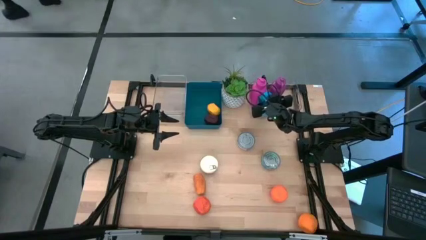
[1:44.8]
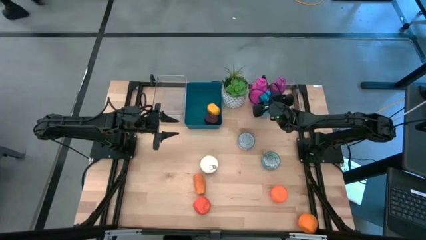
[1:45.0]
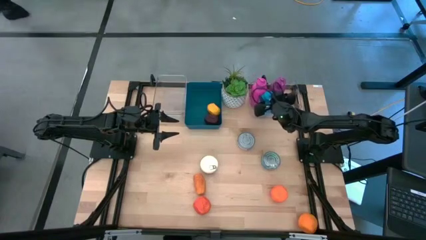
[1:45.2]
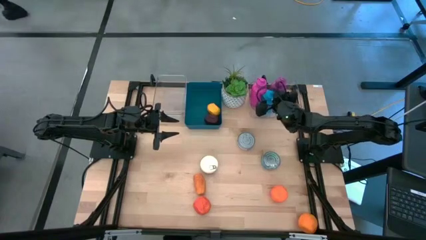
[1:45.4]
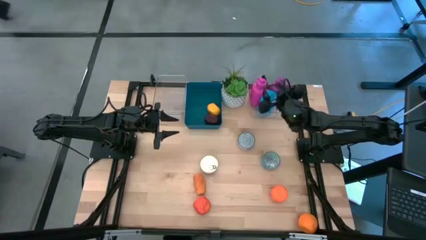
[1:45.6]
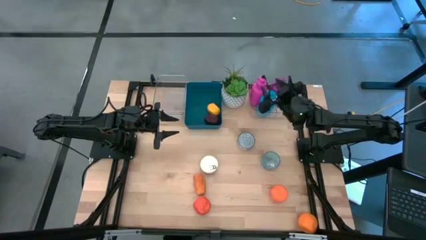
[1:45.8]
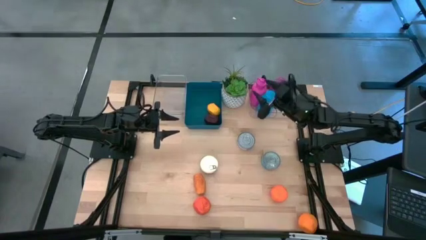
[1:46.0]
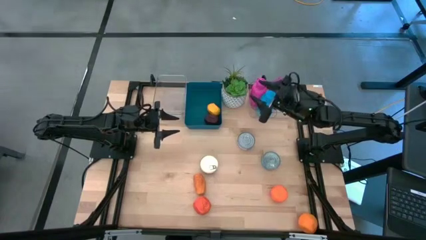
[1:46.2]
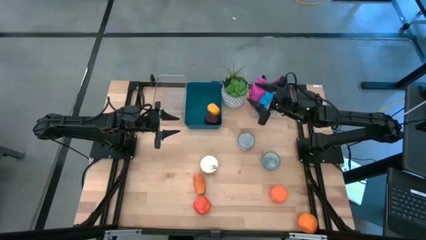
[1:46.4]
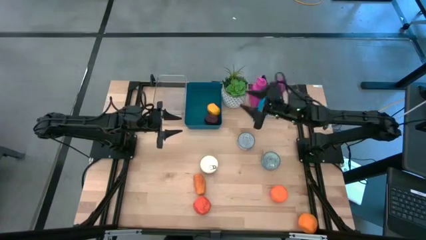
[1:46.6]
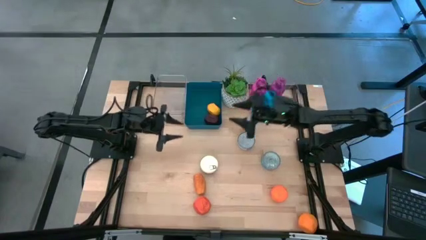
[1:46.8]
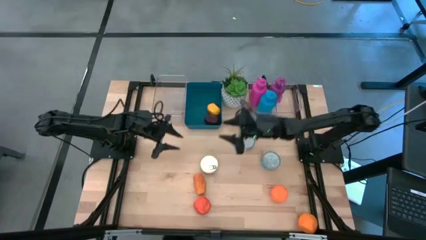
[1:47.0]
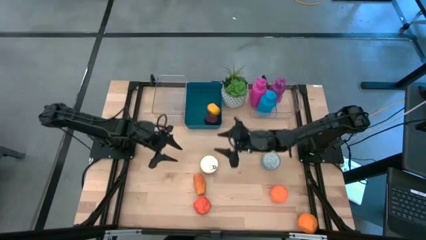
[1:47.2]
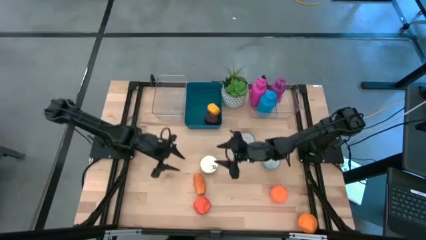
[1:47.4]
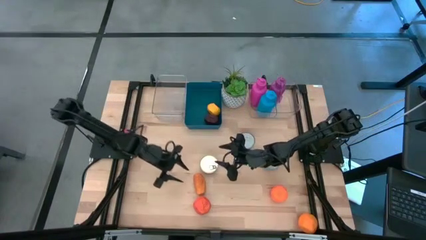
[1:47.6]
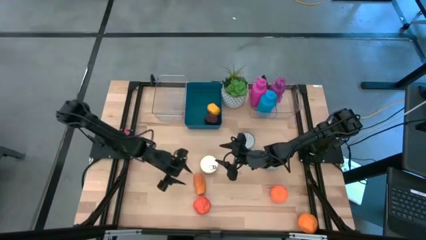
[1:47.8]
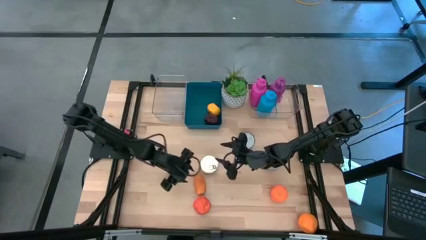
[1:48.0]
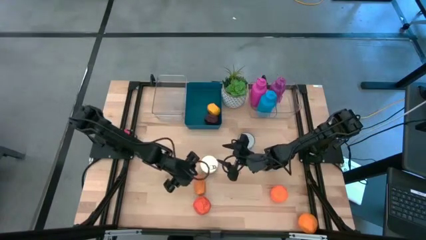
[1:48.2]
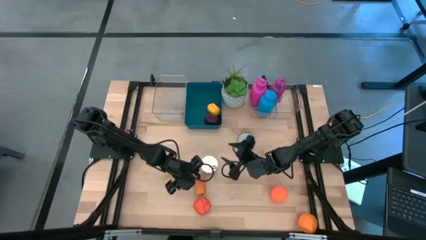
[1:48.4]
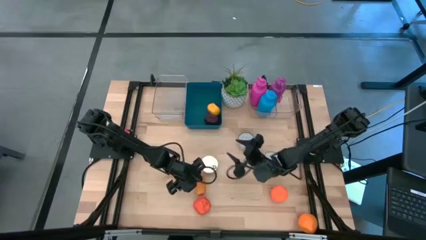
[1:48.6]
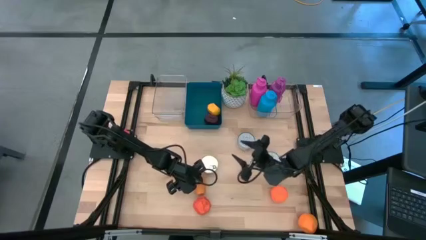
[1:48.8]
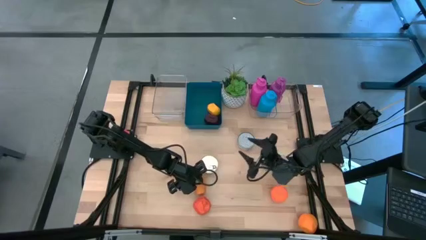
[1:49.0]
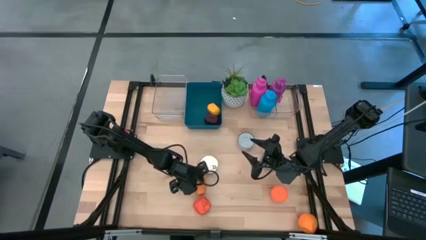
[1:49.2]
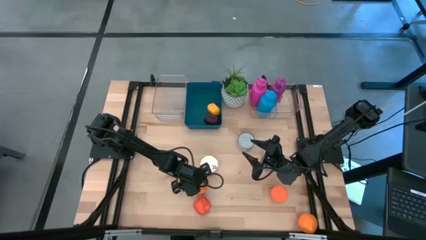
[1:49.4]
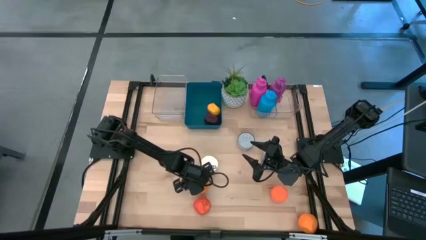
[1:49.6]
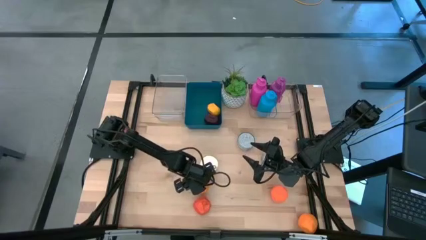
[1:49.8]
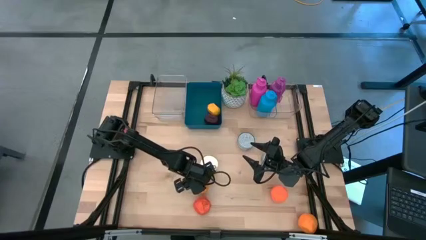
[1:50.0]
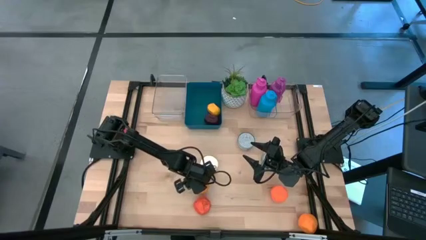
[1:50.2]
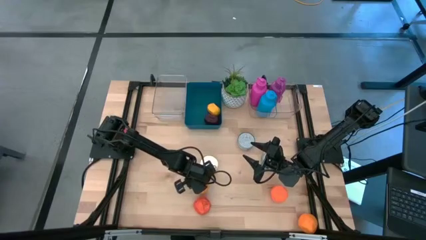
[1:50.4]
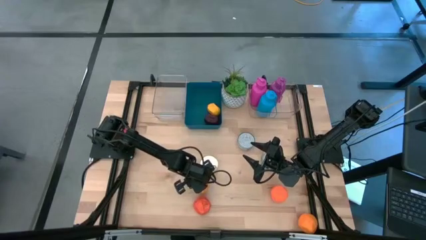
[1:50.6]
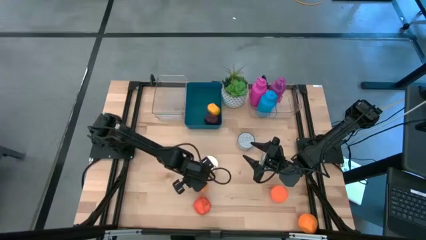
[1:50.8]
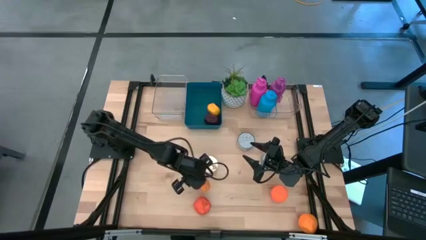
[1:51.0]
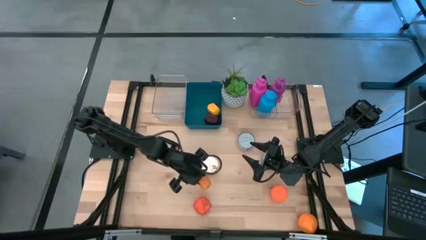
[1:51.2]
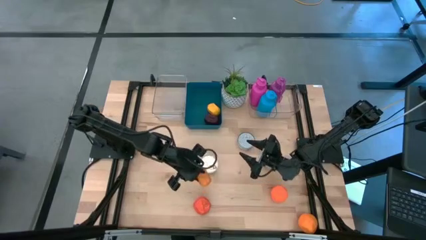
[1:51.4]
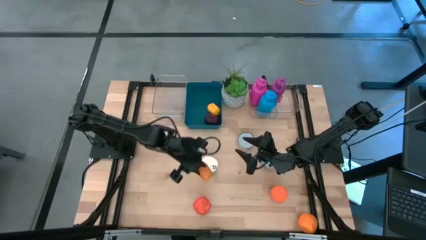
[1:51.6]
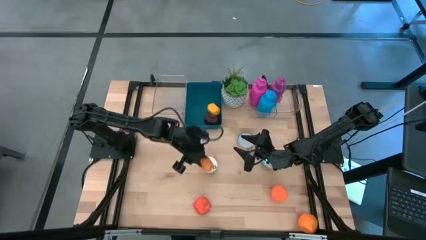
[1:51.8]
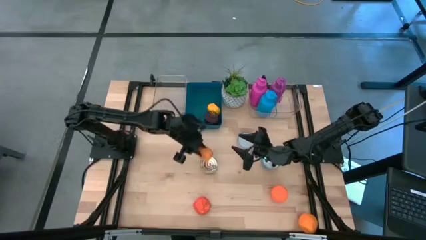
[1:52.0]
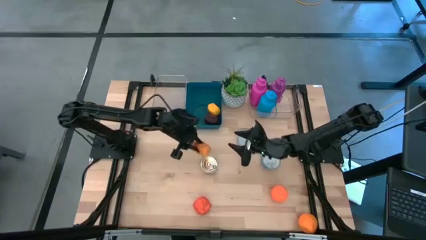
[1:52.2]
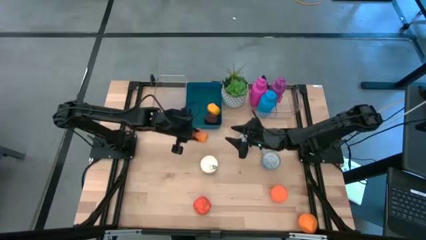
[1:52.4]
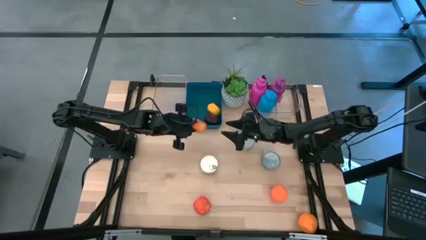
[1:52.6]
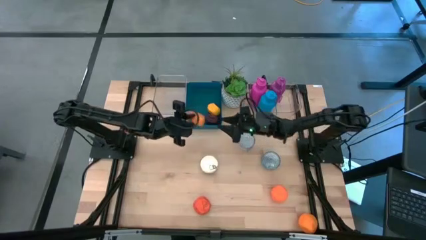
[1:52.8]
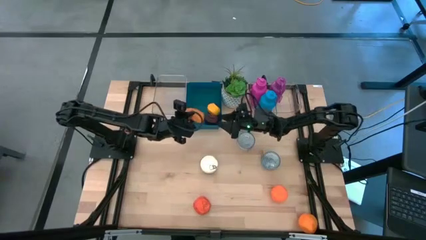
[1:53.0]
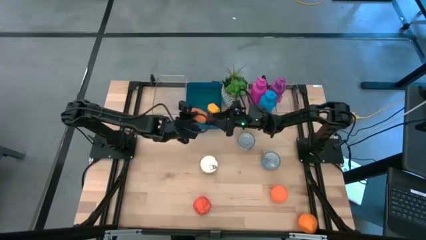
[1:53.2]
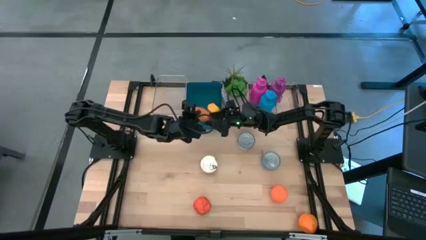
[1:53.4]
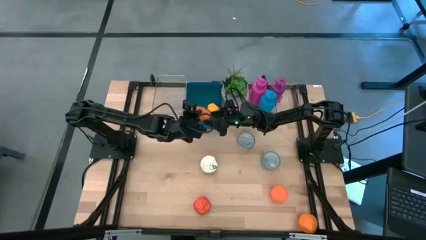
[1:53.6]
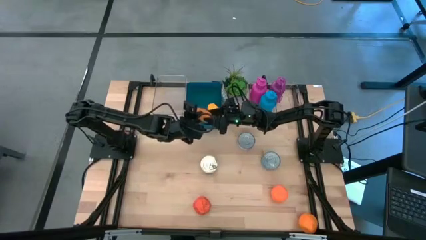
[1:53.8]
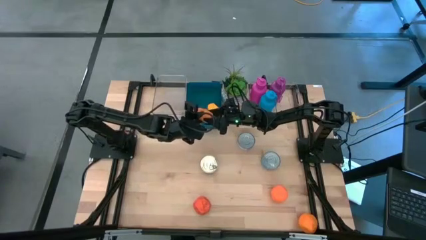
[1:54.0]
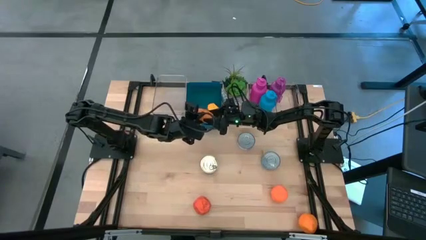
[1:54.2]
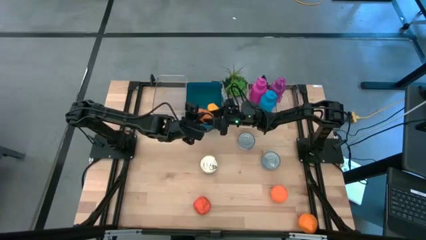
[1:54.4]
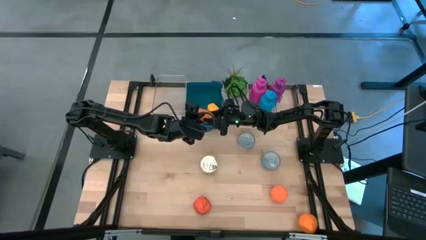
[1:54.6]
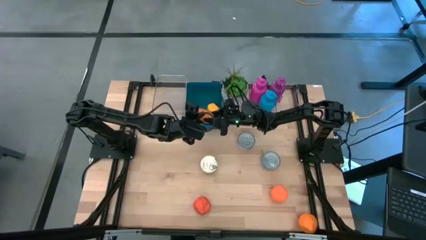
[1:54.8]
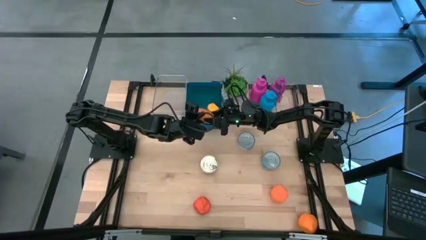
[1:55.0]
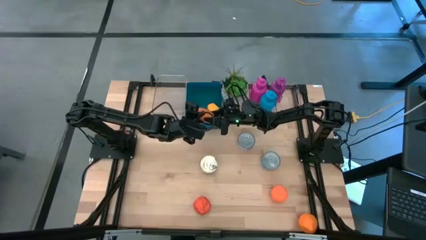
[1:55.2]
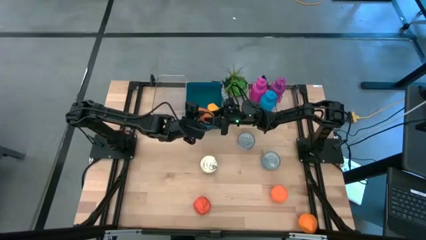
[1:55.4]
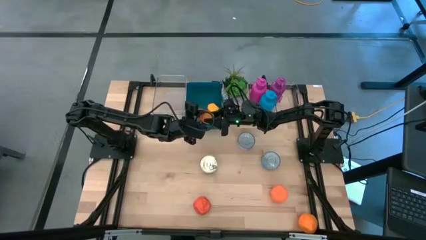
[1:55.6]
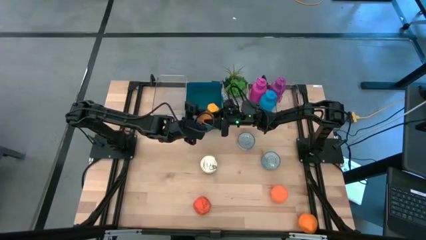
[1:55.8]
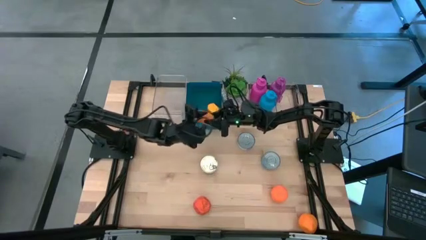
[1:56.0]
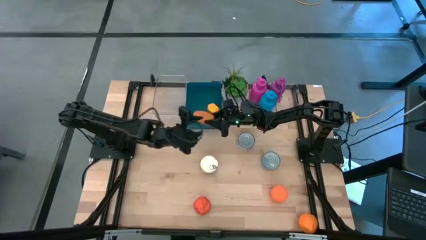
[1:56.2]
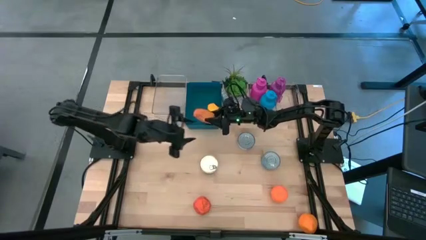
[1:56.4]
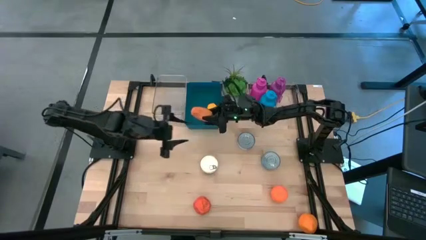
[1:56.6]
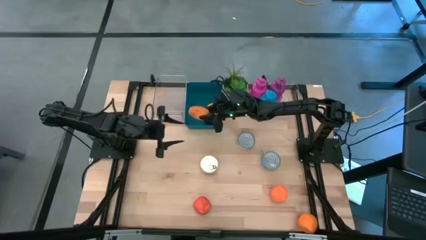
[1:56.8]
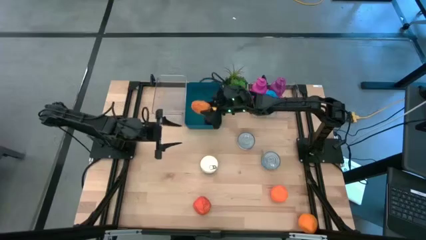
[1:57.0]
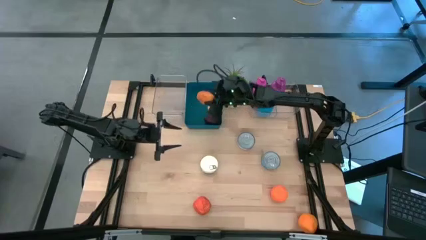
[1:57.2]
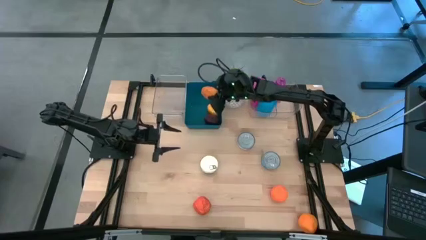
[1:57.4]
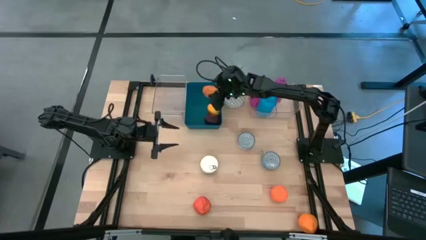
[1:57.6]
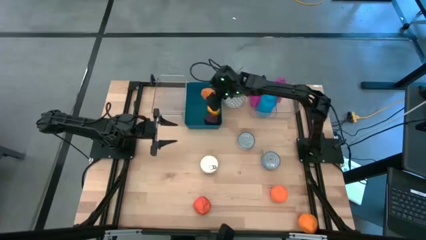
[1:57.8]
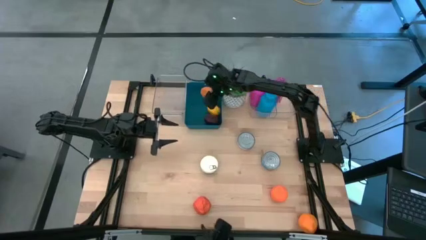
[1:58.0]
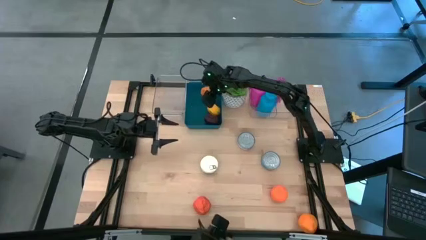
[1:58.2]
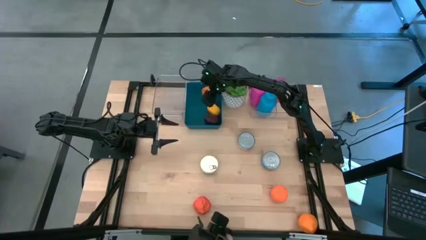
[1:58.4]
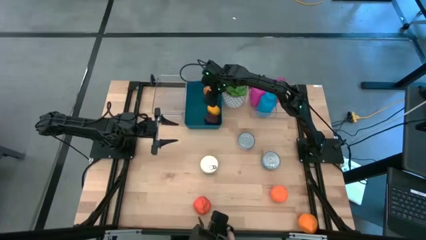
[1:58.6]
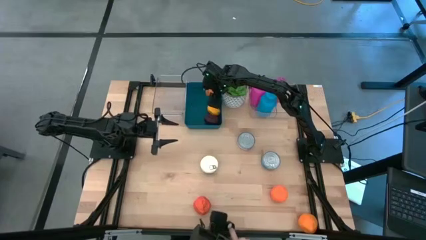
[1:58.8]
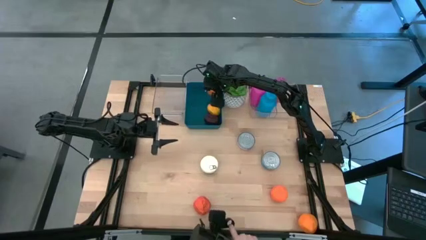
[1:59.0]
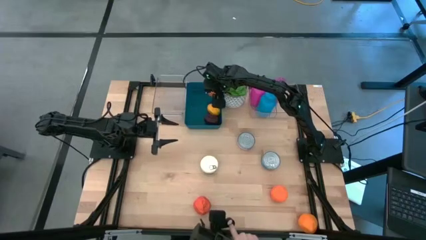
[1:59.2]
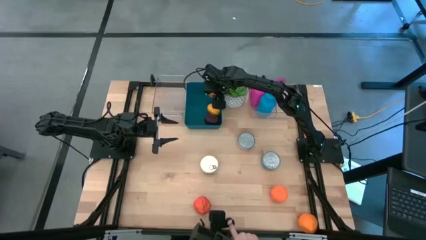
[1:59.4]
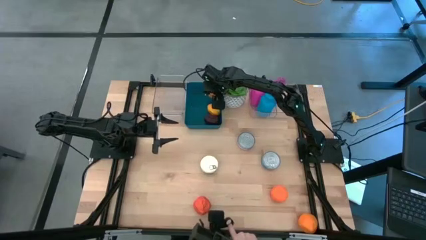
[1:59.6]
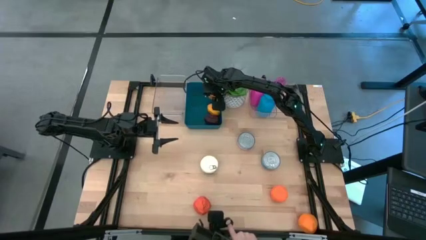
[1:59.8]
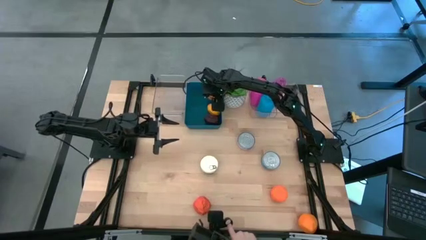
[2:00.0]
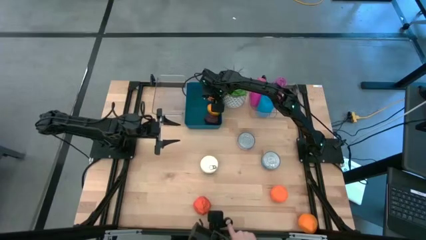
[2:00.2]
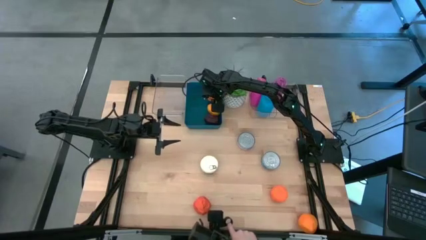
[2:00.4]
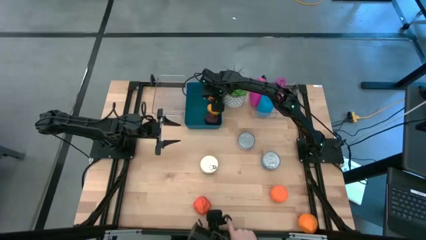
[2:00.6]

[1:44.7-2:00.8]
Task: Pick & Place Food Item
Put the mango into the blue bin

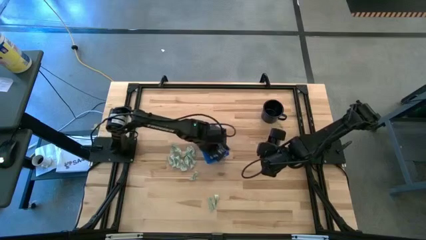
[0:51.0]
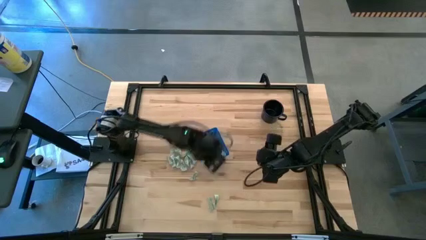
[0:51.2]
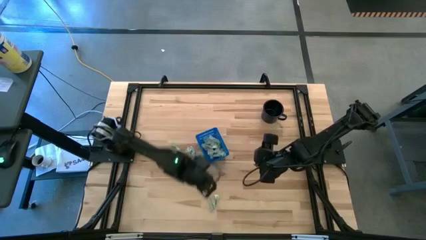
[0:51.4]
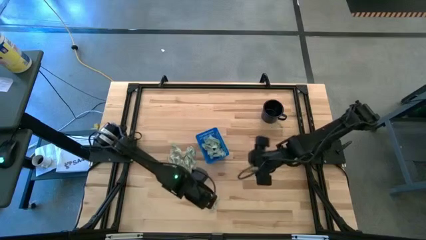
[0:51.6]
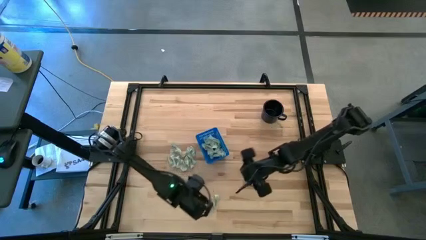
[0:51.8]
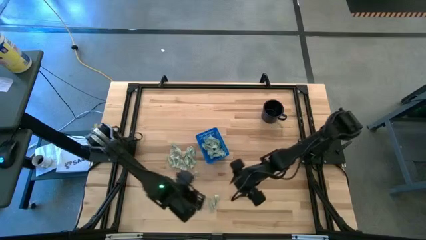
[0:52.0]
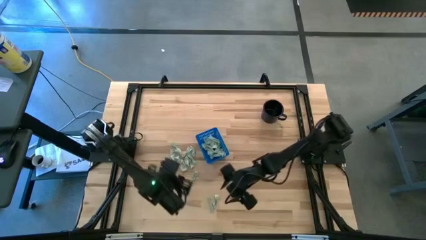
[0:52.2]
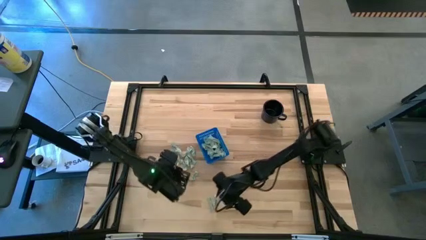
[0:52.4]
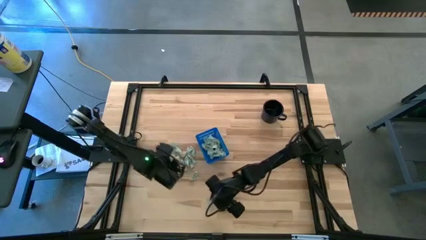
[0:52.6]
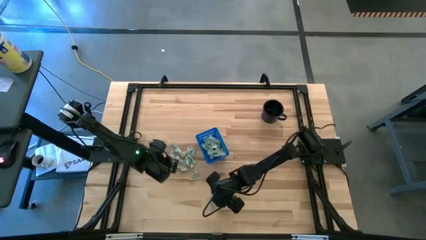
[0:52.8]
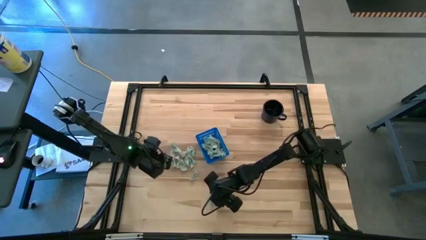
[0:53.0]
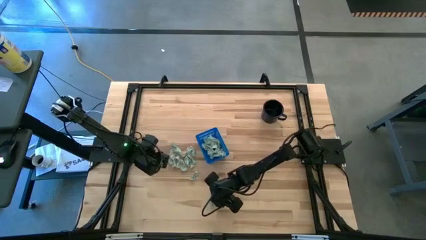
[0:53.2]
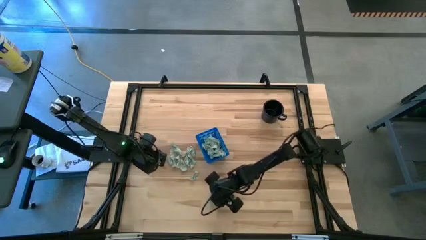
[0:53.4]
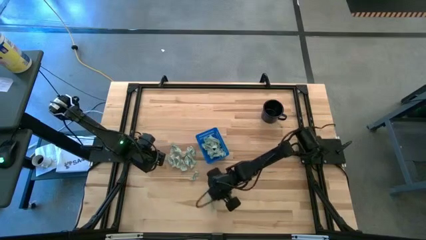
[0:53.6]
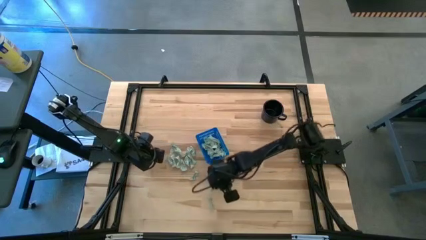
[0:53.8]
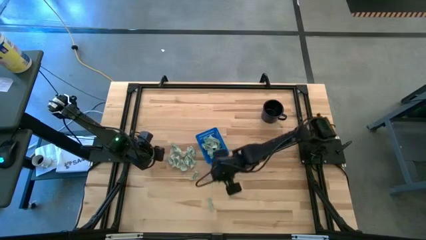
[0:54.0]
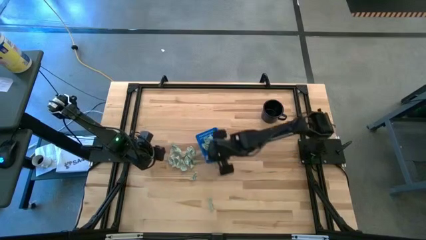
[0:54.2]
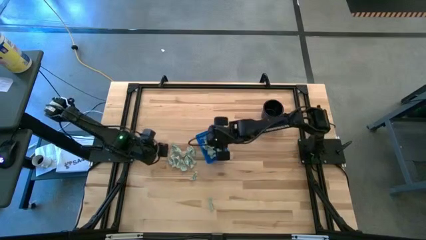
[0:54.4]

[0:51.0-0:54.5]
Task: Pick and place Stevia / Truvia into bins
Put the stevia packet into the basket
